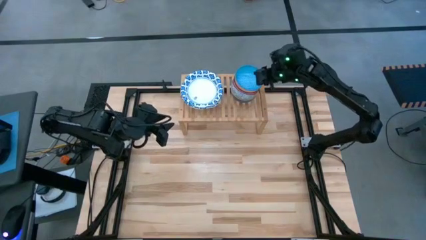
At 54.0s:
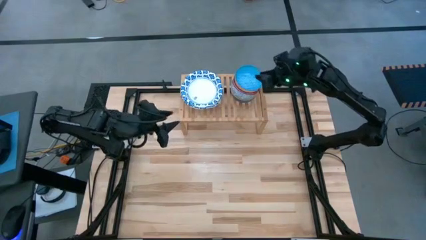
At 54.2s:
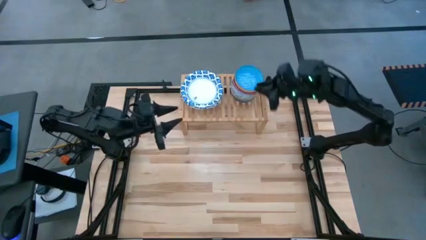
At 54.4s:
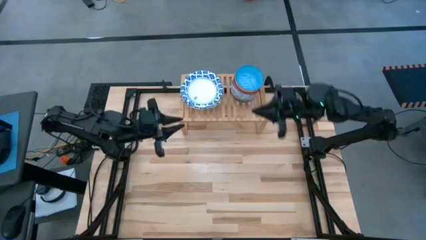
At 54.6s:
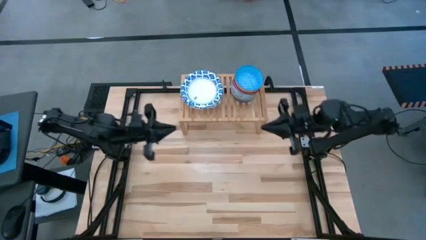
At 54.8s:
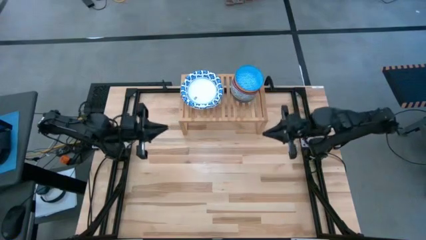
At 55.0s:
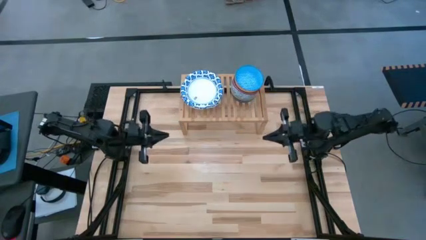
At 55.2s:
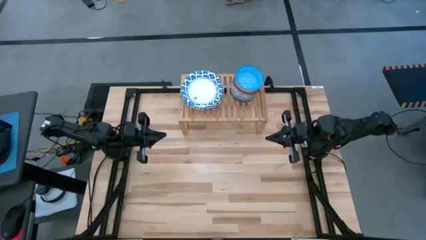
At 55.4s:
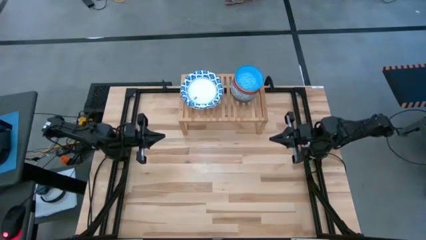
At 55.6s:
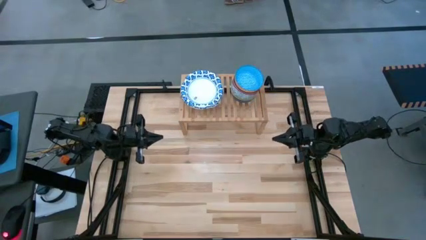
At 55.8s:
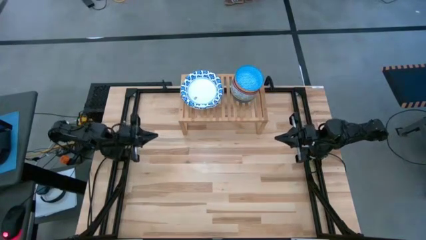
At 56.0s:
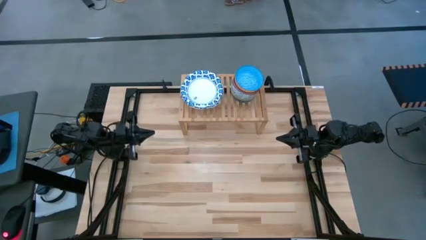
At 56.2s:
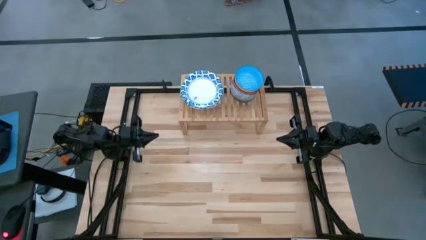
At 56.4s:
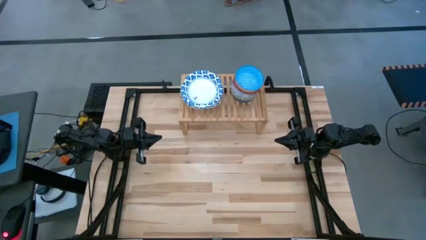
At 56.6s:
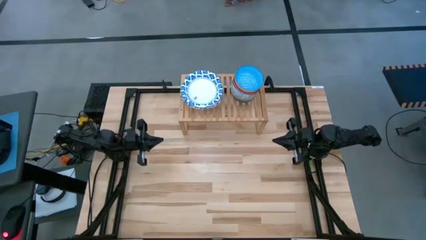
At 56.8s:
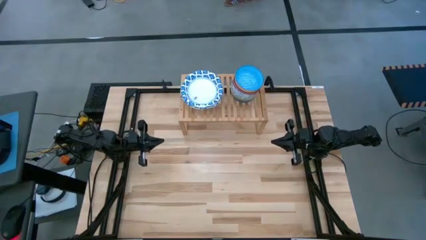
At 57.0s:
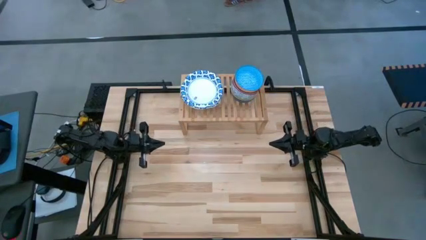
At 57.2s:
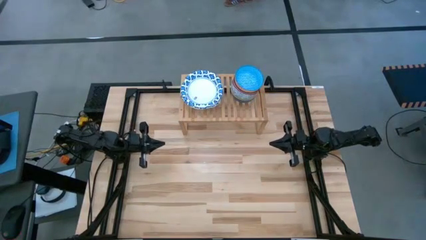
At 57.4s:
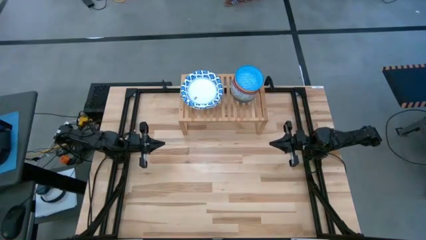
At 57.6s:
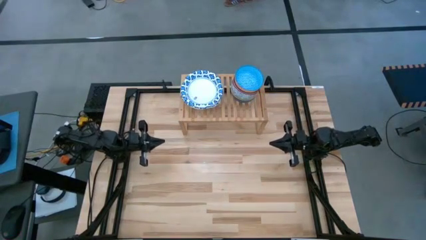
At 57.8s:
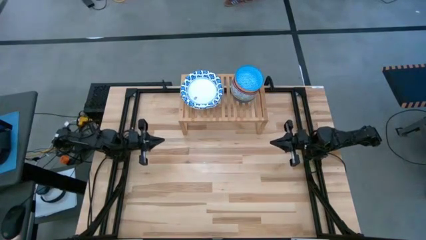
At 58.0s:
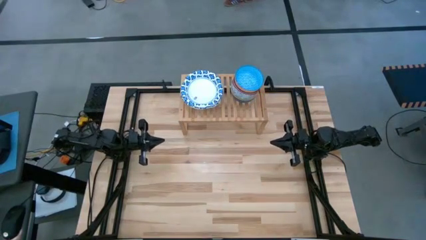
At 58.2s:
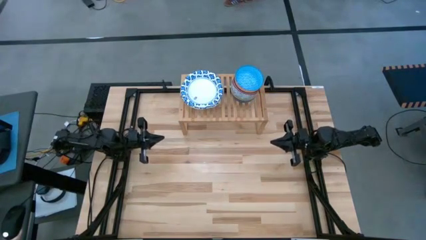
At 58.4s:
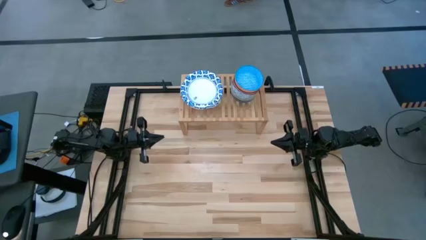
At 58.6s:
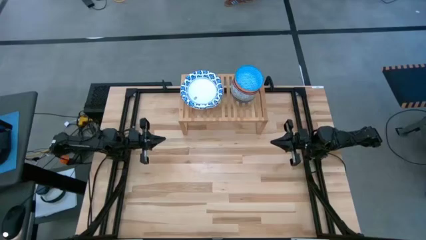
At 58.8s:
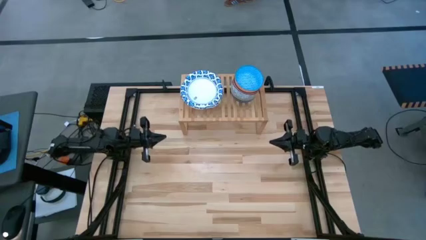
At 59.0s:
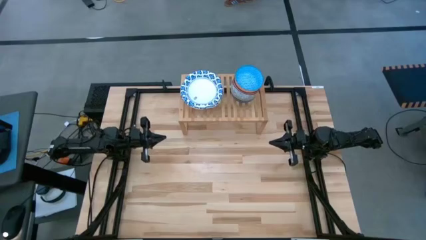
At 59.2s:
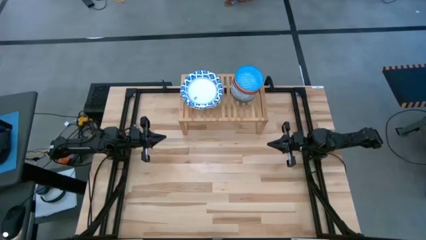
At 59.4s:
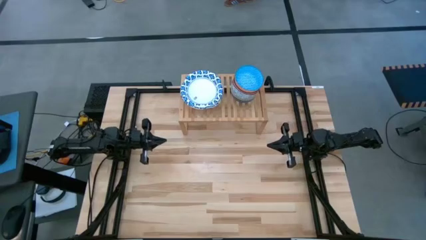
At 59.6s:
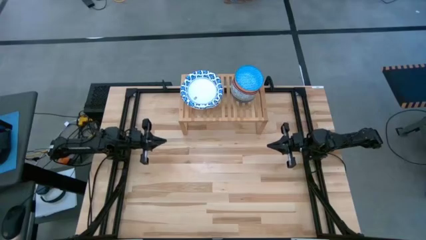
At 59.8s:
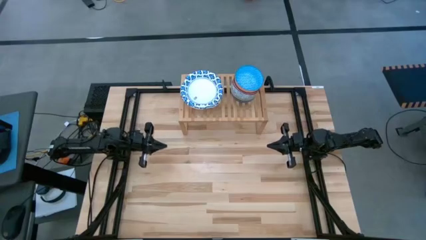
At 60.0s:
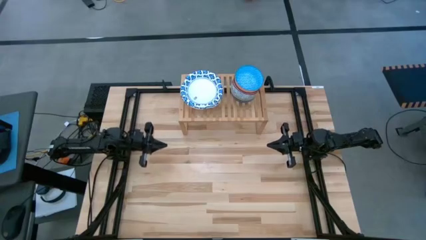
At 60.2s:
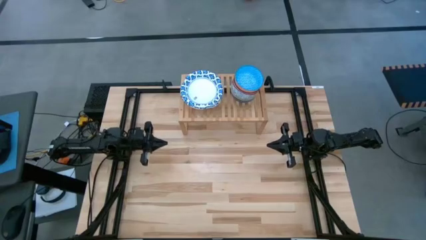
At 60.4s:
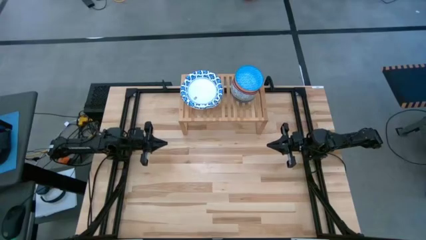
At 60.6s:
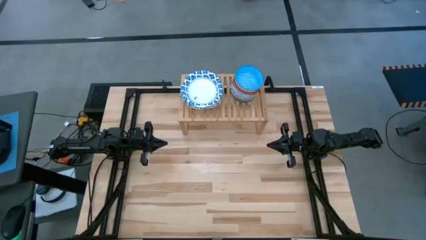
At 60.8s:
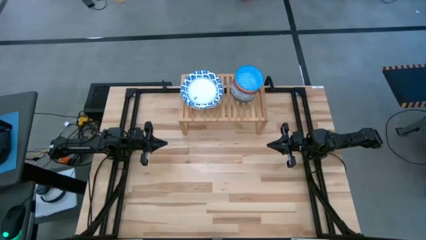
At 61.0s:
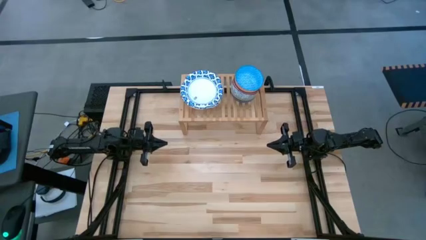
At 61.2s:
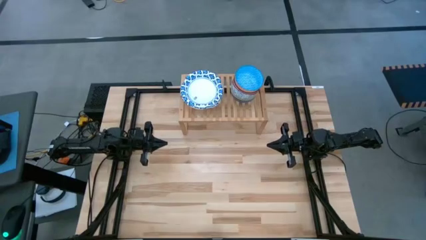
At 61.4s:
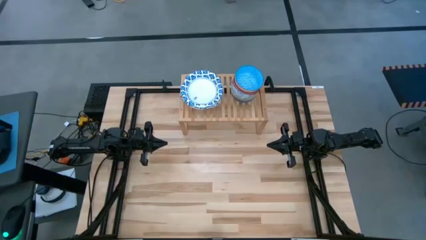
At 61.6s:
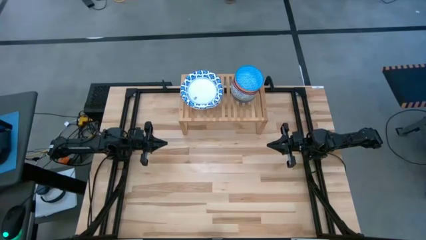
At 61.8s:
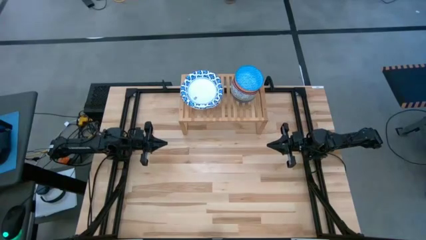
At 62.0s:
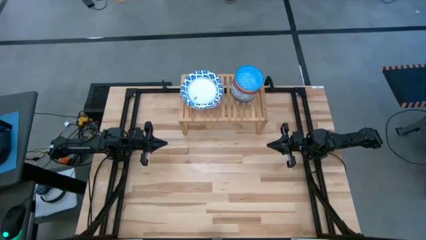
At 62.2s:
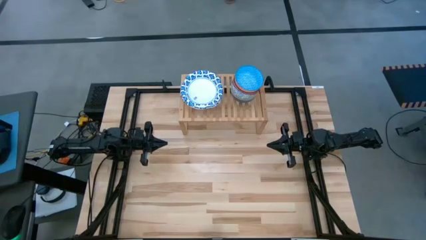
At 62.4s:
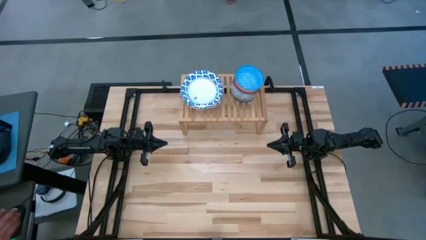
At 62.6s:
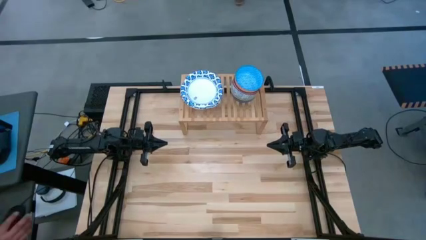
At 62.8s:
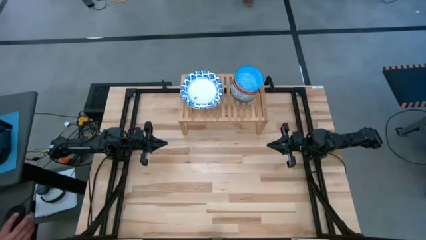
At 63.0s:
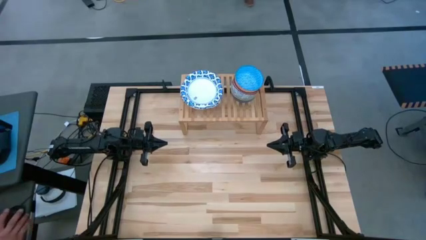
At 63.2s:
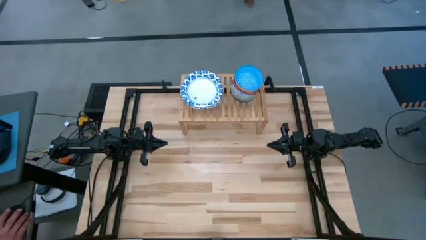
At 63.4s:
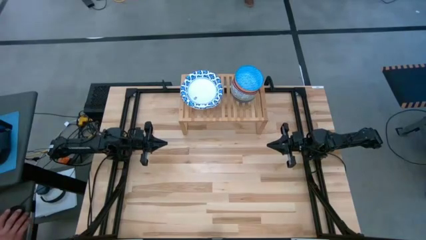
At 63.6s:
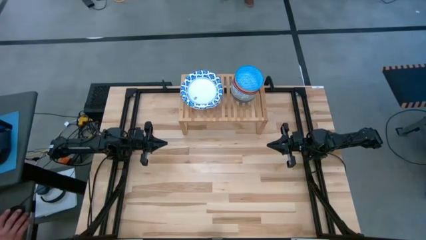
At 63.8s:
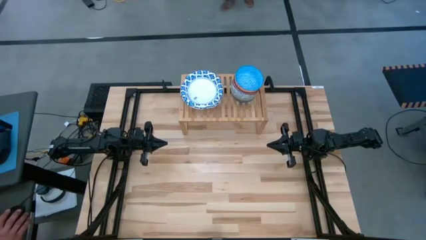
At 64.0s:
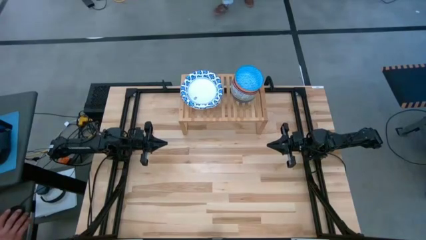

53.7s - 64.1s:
Task: Place and stack bowls onto a shelf
Return to Home Position

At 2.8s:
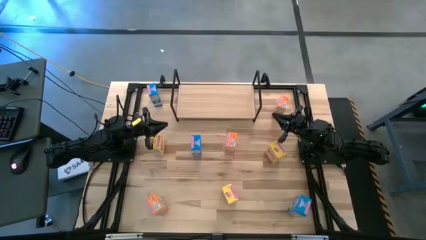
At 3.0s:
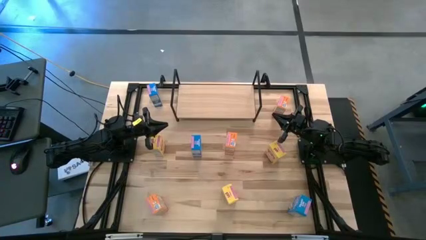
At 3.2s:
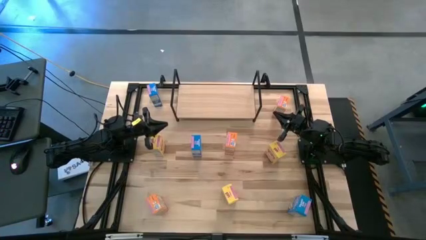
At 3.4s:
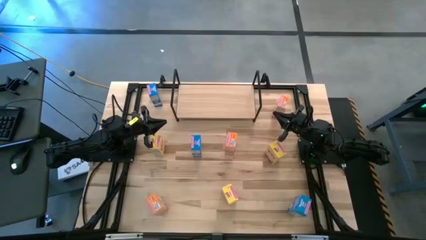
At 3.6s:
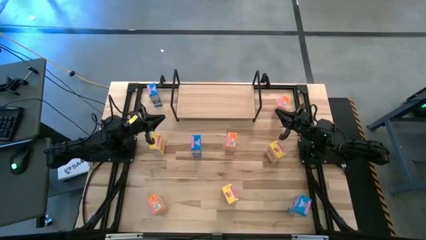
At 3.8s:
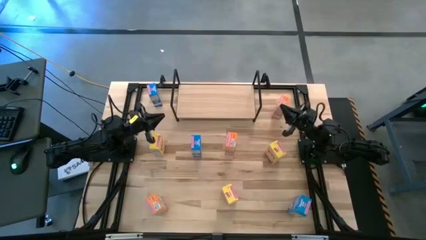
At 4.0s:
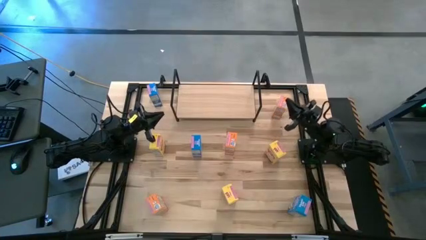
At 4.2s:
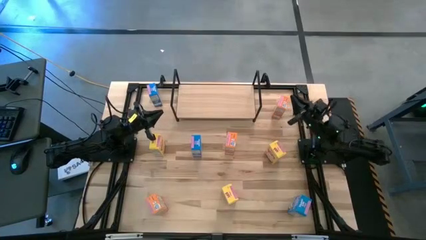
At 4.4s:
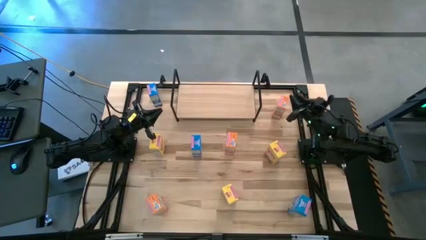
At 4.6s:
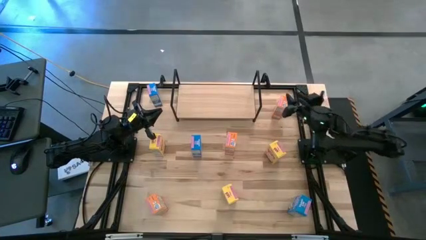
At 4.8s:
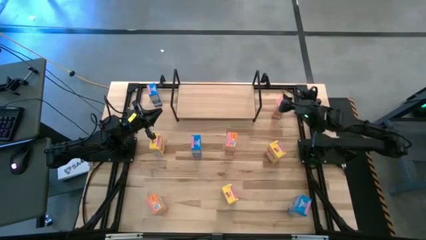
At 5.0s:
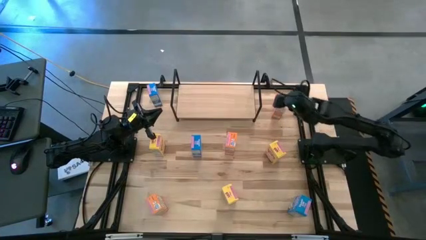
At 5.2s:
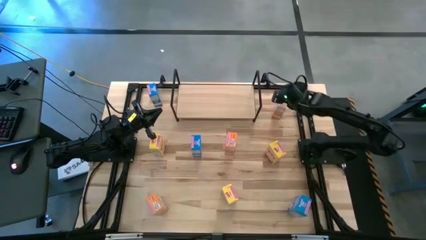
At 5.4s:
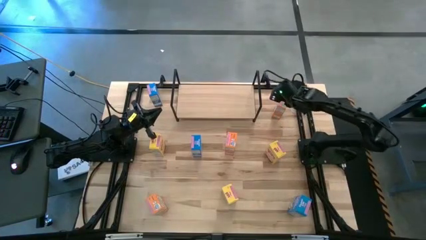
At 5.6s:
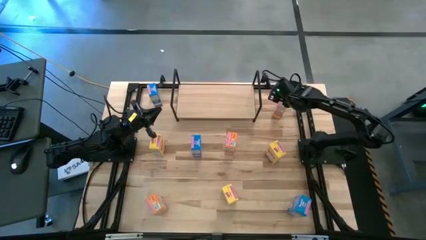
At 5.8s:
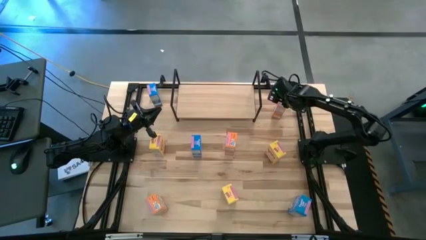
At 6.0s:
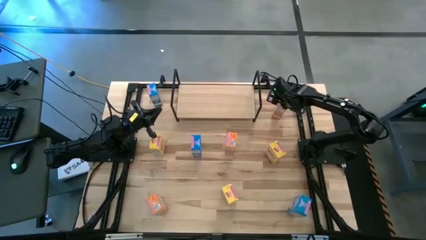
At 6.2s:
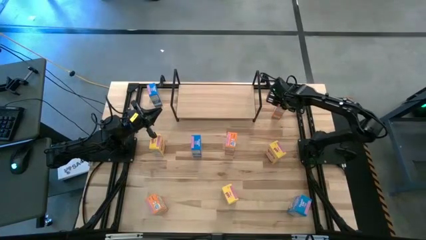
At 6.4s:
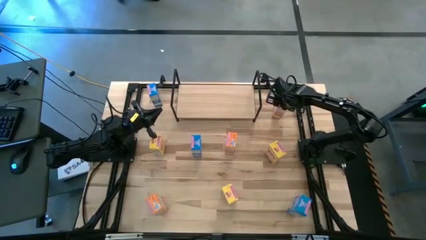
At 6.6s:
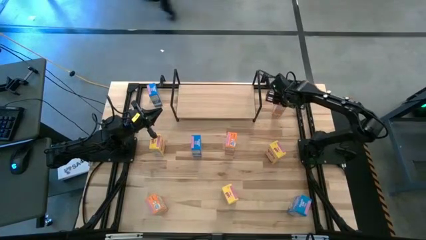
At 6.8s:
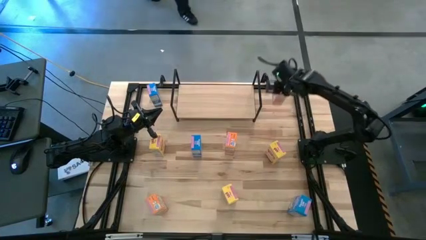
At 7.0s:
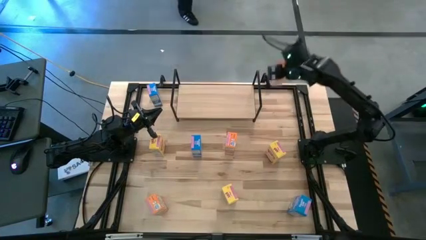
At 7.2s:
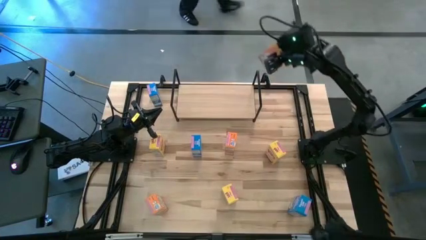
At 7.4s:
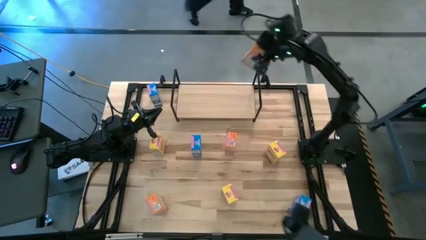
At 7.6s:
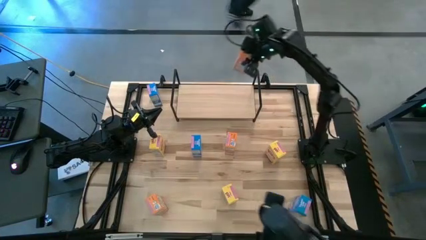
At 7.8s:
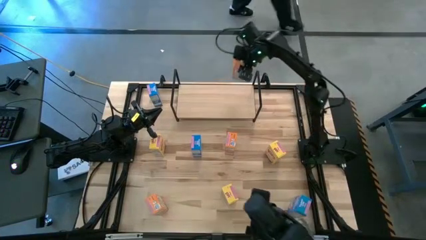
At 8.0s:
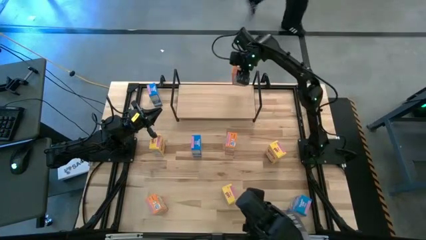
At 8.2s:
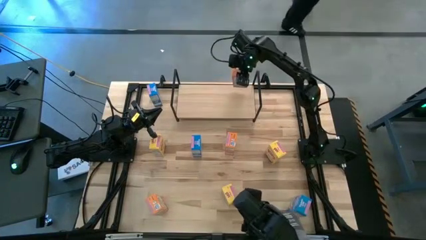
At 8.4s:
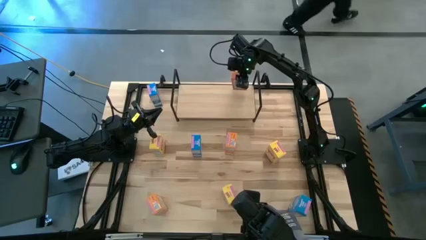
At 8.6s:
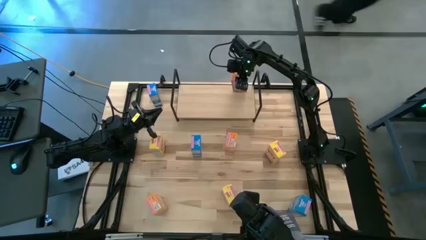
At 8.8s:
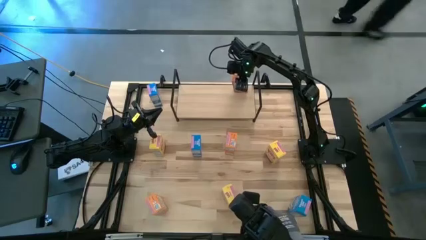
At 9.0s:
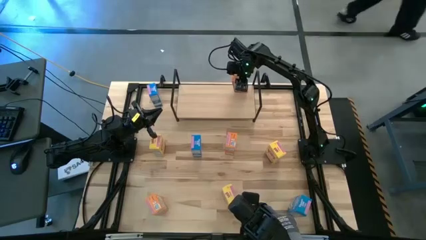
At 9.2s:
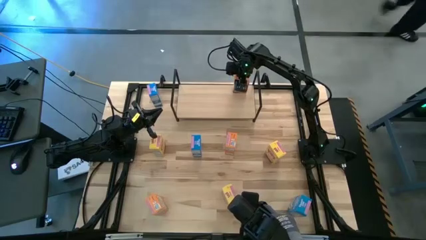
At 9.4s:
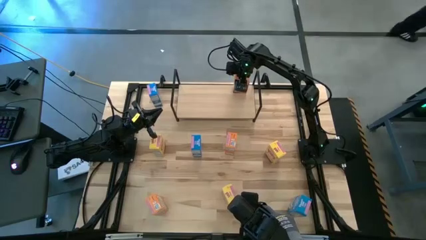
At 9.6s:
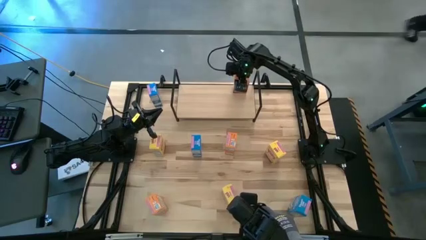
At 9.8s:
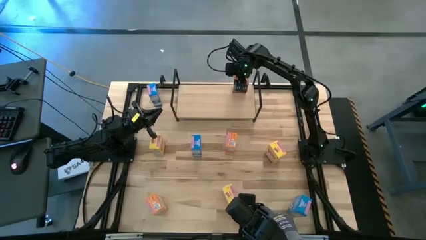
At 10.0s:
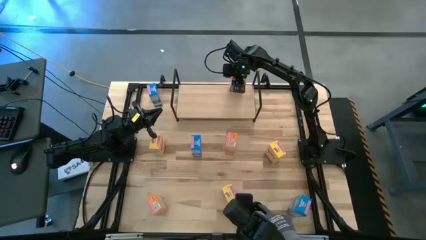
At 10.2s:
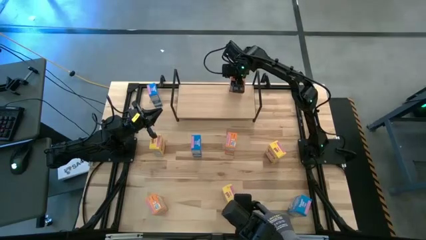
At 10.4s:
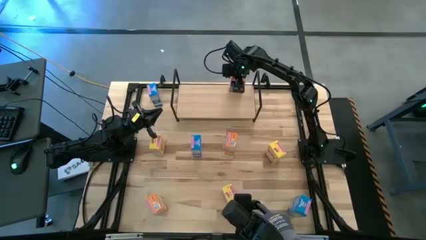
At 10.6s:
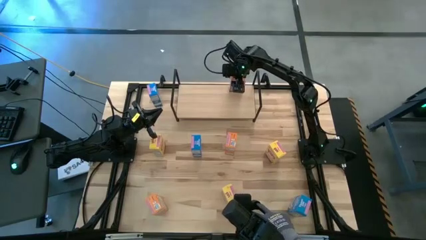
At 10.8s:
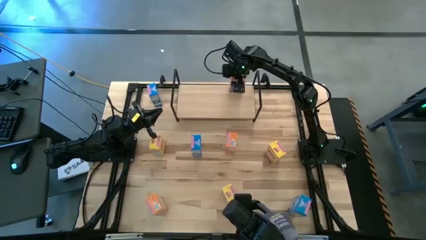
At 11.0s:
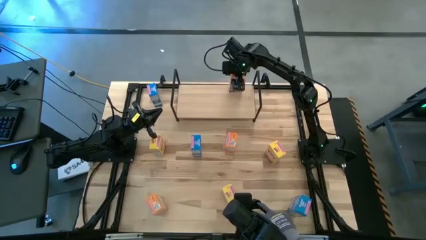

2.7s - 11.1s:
Task: Stack cereal on shelf
Put the top orange cereal box on the shelf
